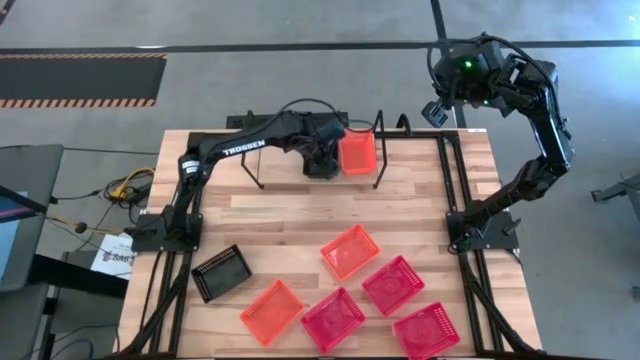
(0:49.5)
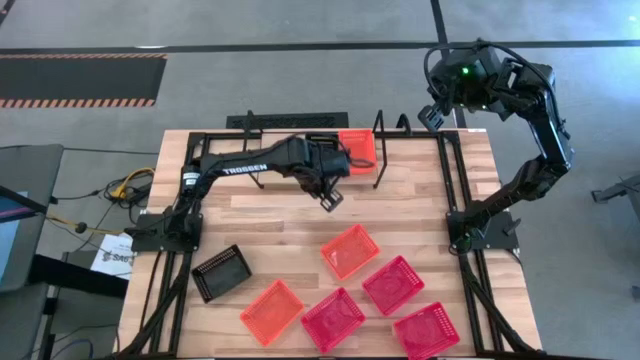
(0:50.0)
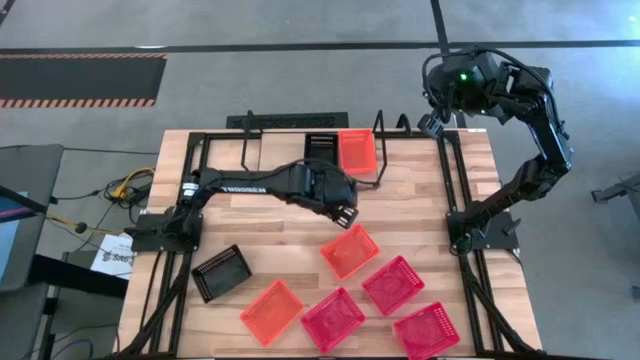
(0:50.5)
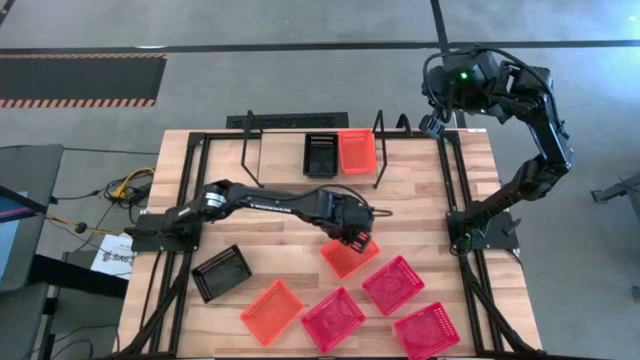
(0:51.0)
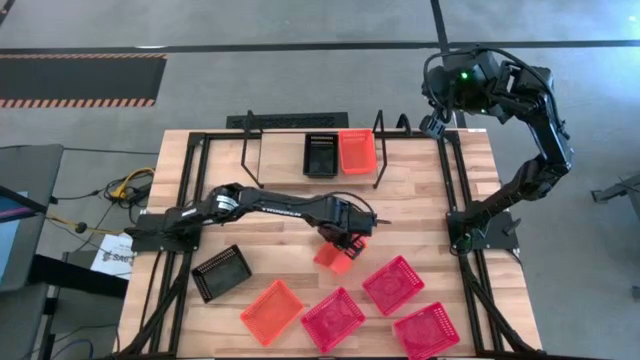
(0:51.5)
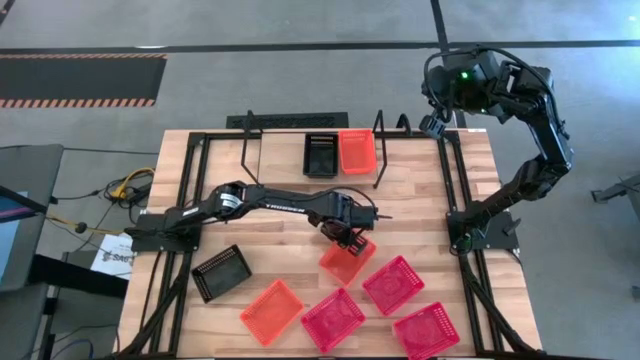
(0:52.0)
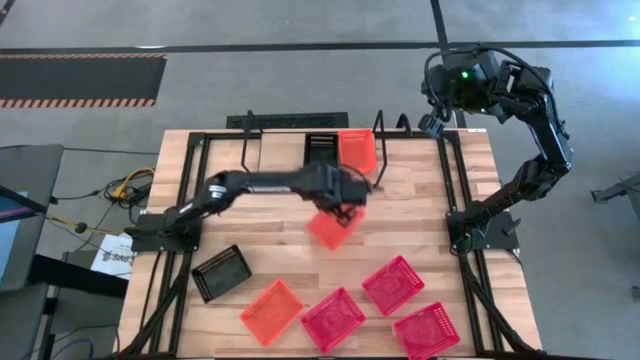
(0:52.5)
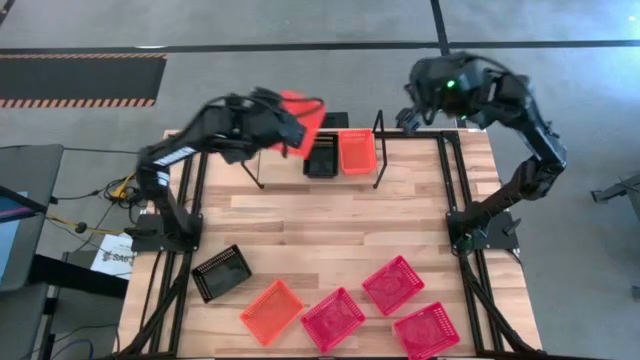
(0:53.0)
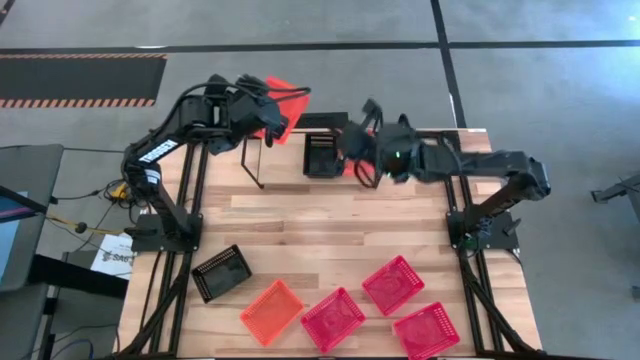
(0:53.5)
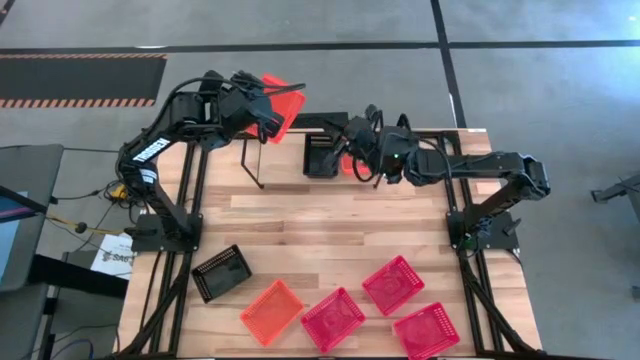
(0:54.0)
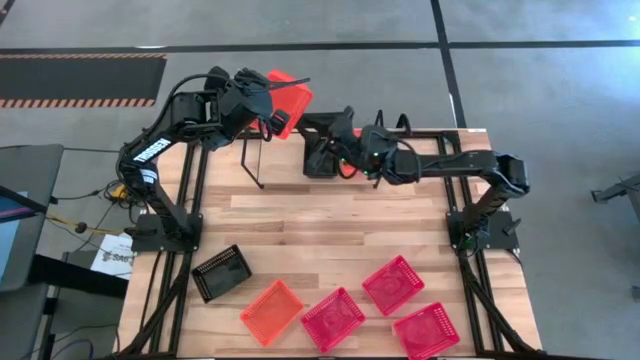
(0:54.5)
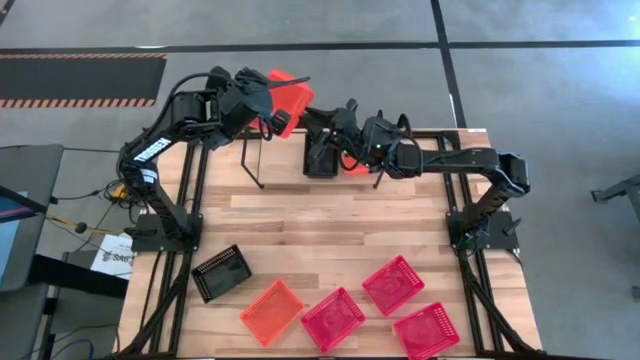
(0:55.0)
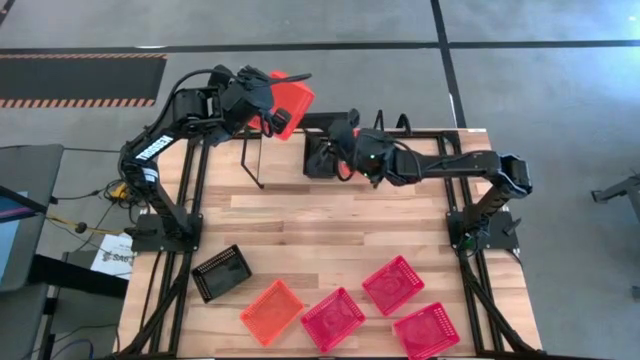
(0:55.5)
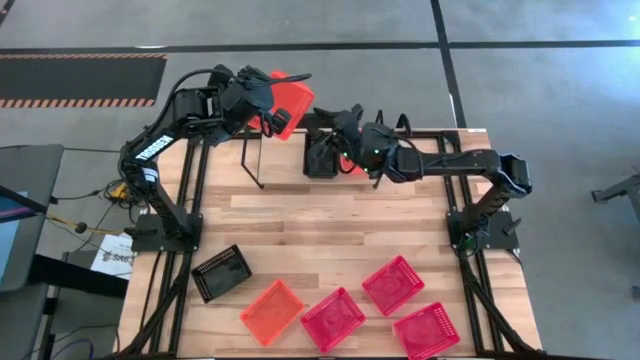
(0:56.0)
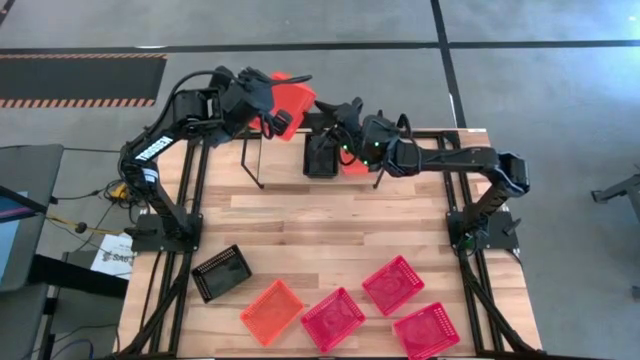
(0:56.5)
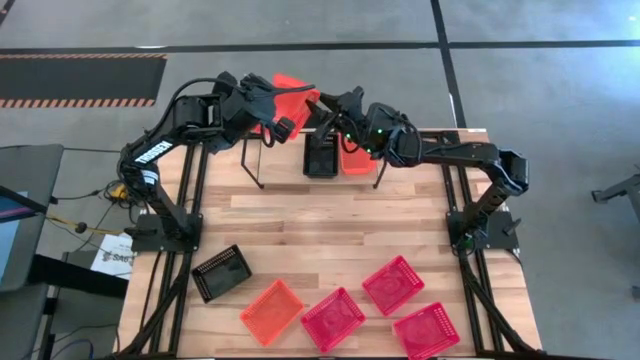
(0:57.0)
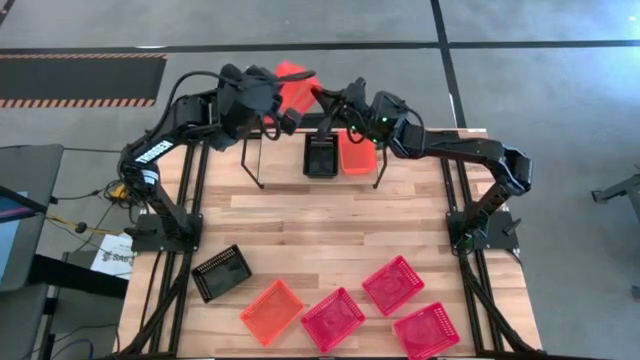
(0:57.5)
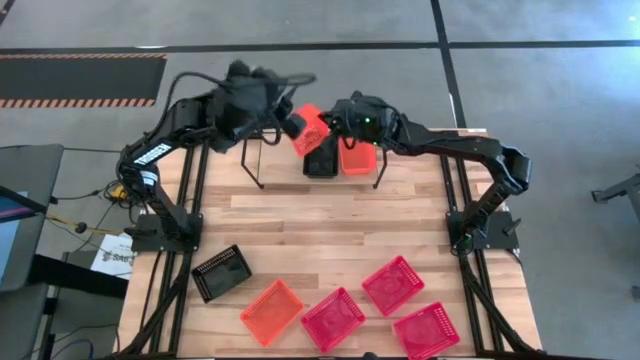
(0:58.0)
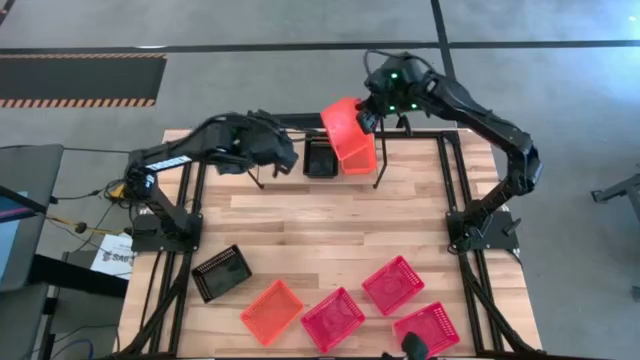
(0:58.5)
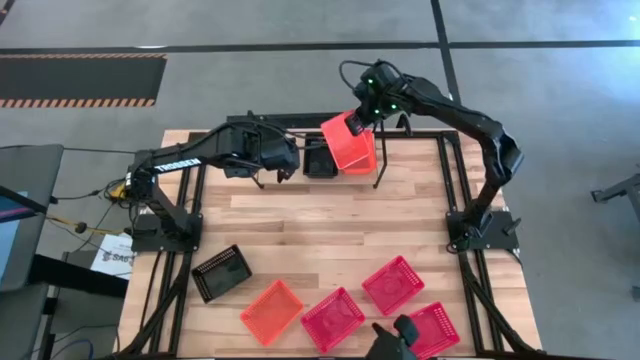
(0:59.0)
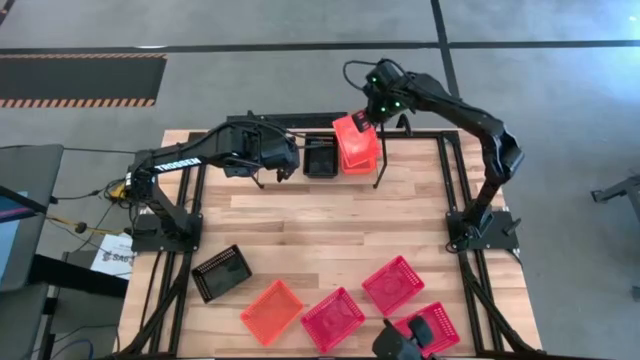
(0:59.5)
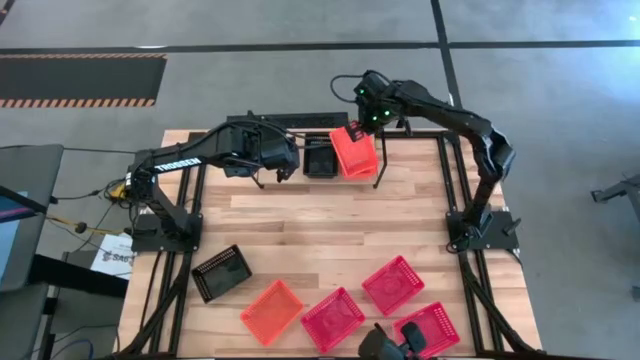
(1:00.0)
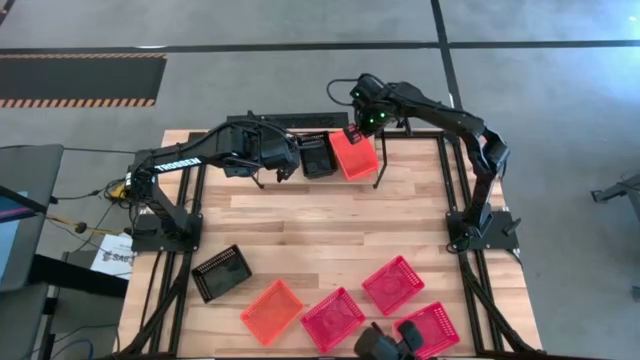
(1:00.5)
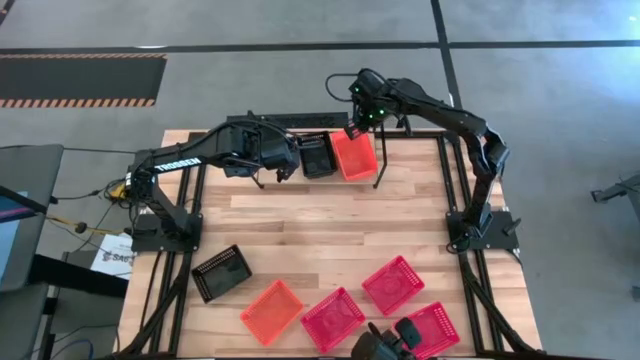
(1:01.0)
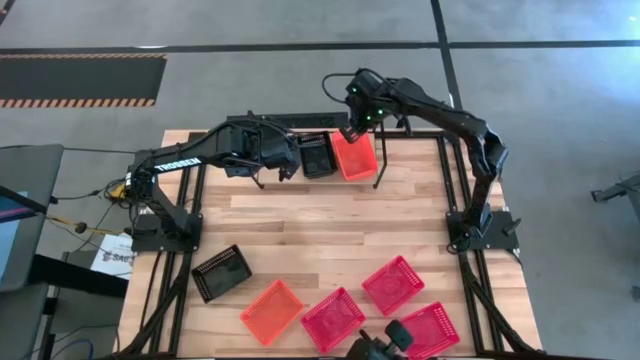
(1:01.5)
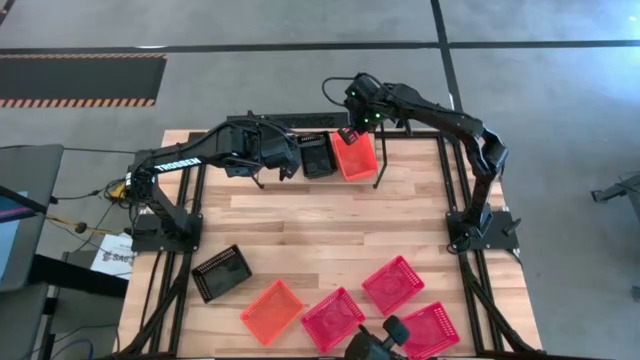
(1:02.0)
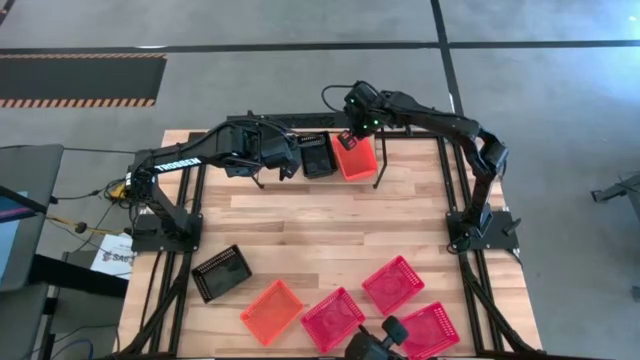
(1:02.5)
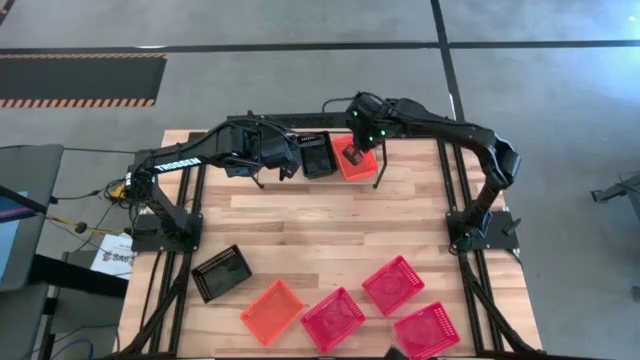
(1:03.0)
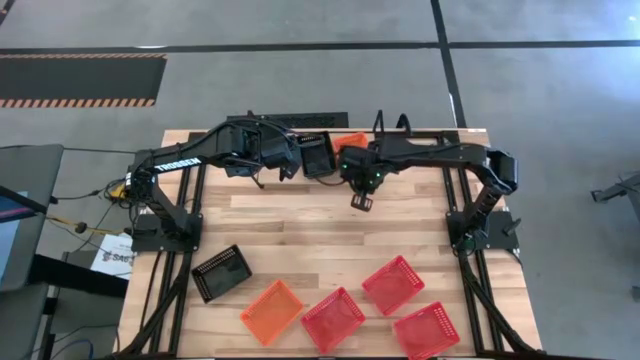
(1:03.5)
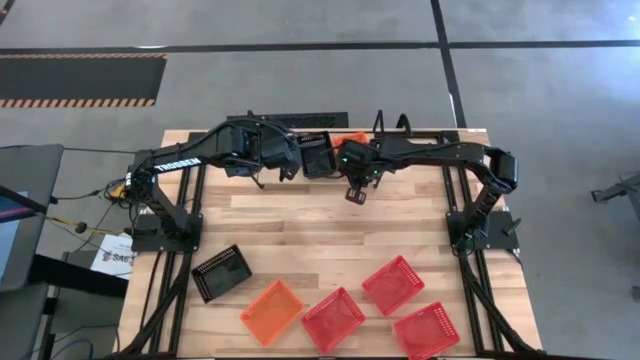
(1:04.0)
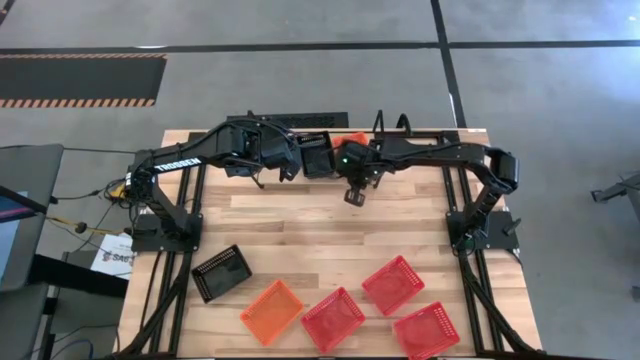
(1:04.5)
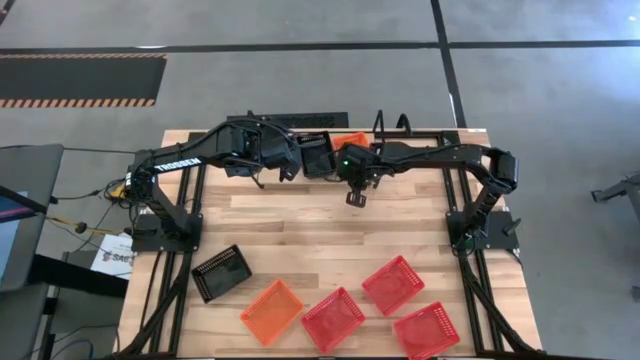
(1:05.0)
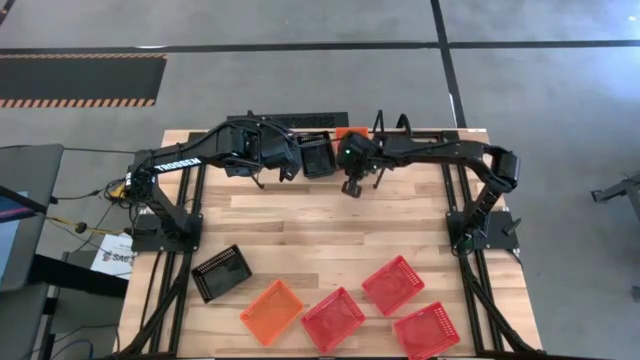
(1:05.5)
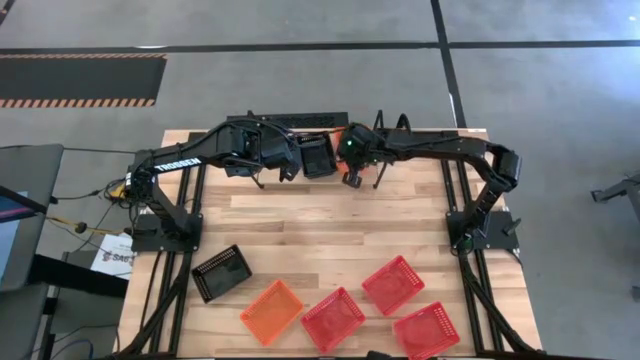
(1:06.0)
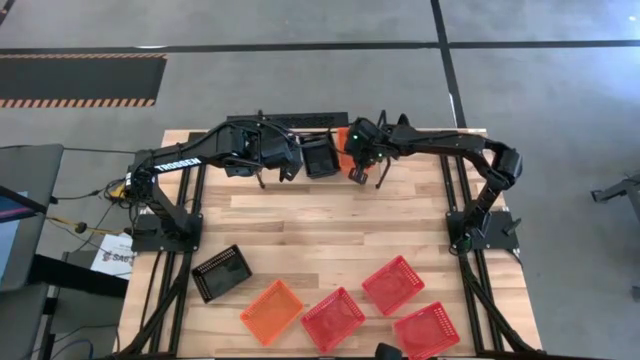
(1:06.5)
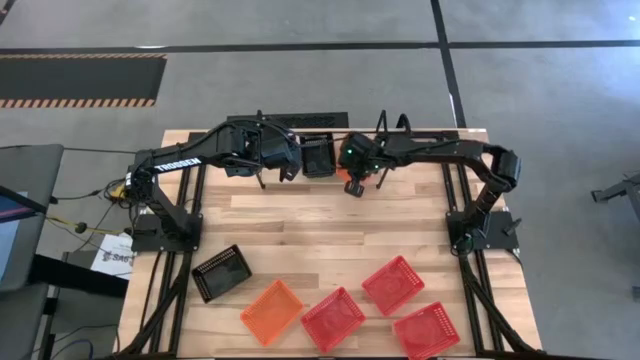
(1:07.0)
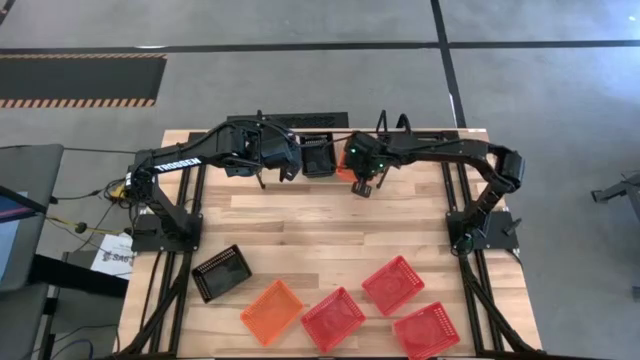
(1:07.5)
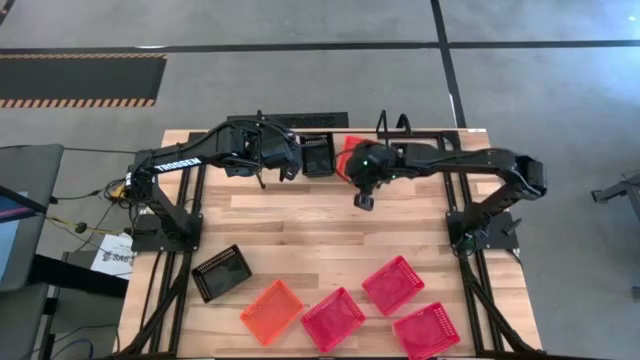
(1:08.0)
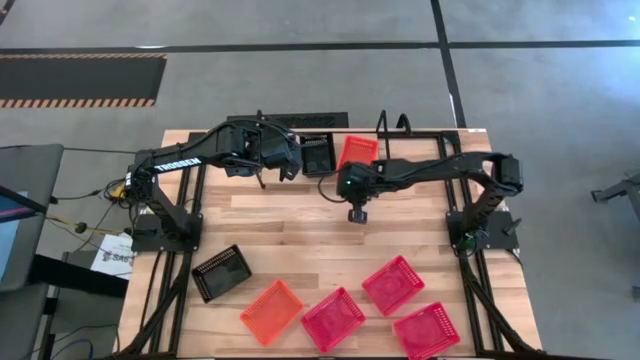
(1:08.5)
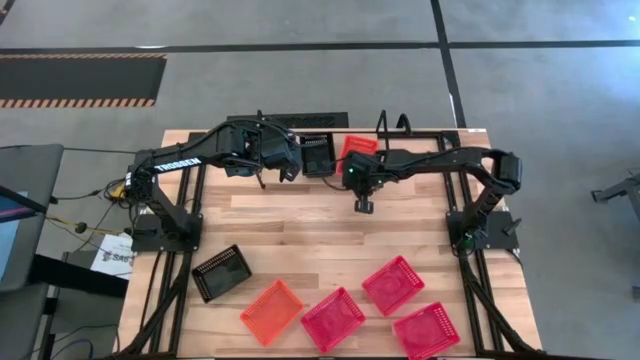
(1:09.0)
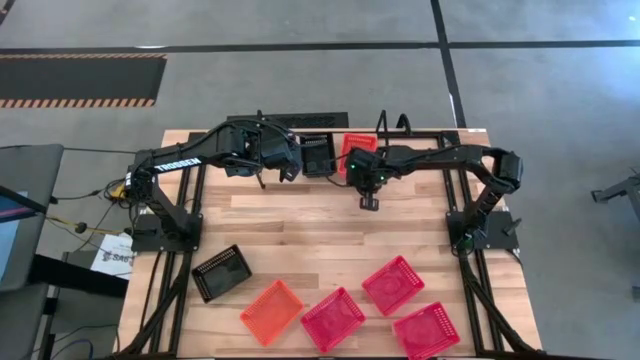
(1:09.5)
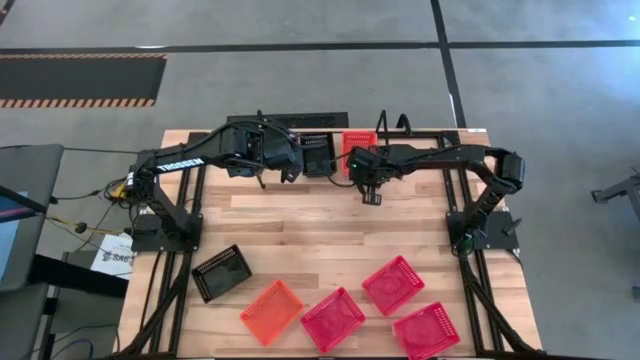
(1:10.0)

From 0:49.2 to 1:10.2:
Task: Stack baskets on shelf by color
Stack the top orange bin on top of the orange bin on the shelf
